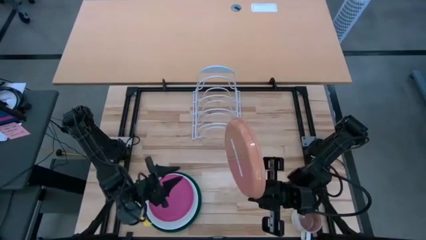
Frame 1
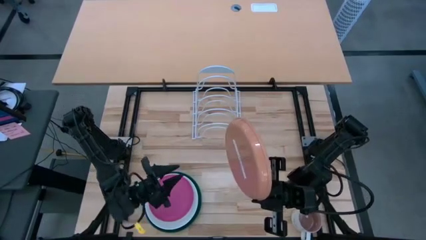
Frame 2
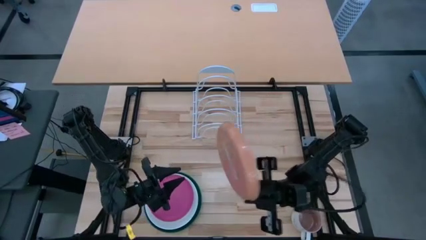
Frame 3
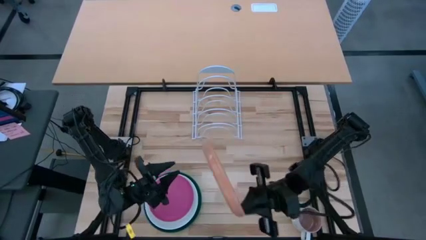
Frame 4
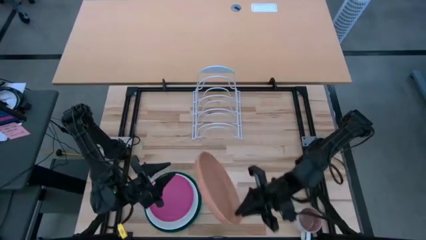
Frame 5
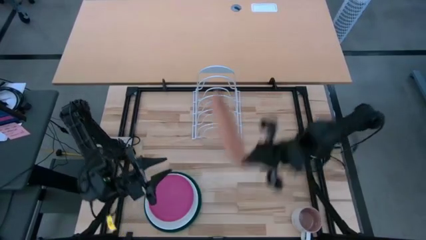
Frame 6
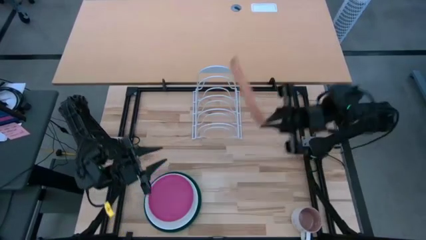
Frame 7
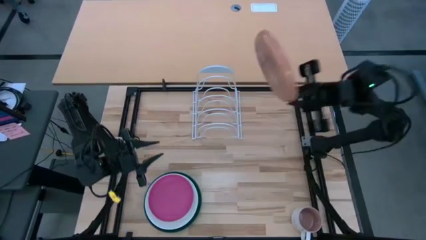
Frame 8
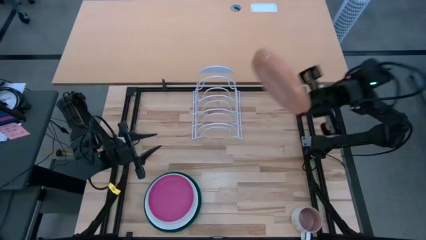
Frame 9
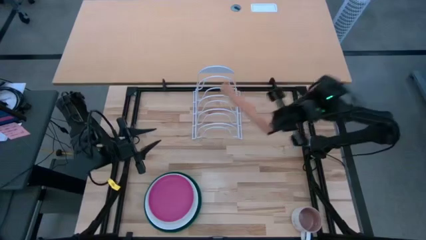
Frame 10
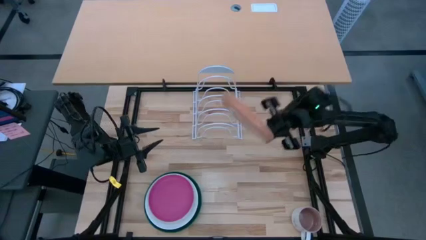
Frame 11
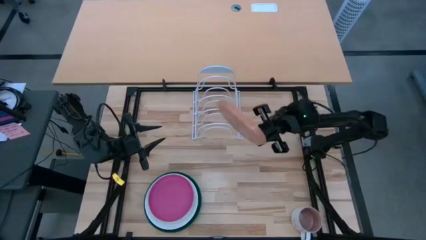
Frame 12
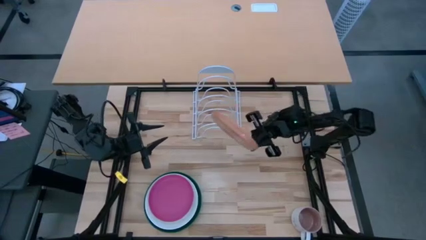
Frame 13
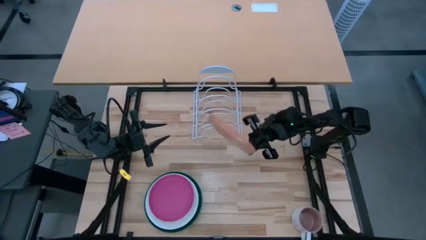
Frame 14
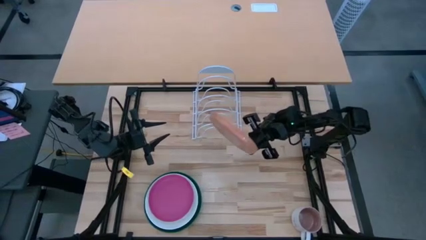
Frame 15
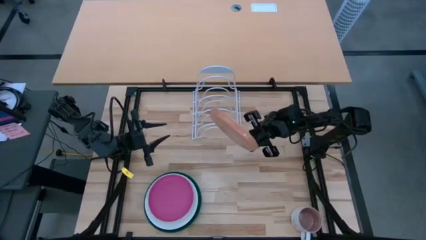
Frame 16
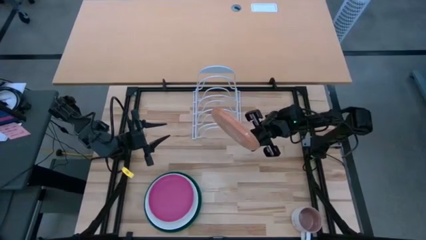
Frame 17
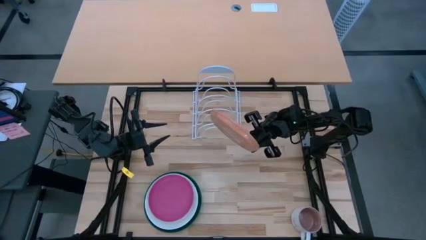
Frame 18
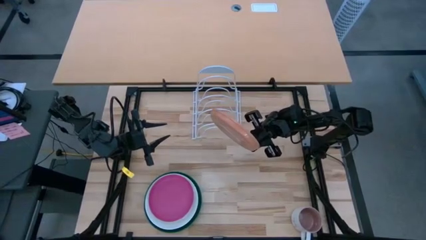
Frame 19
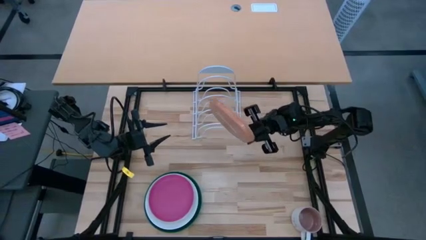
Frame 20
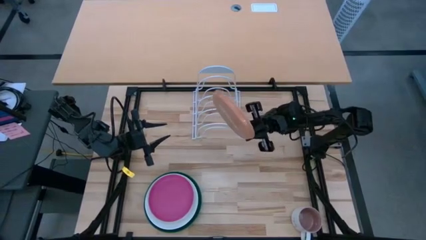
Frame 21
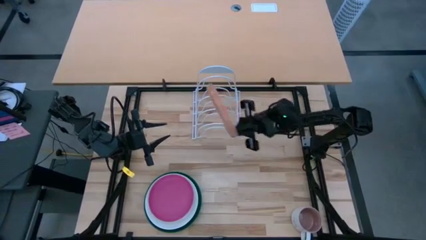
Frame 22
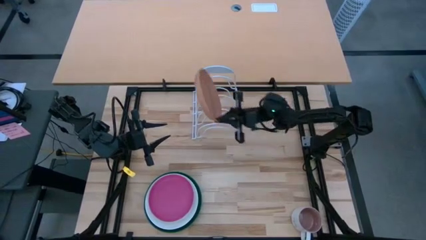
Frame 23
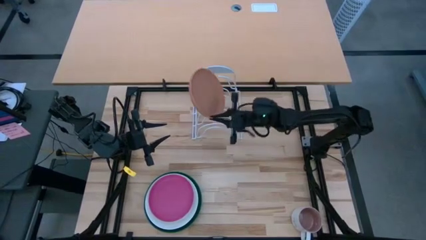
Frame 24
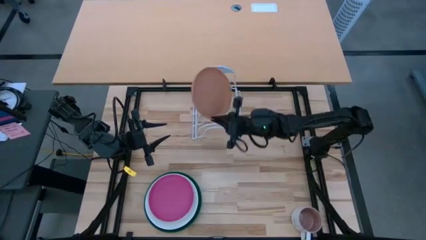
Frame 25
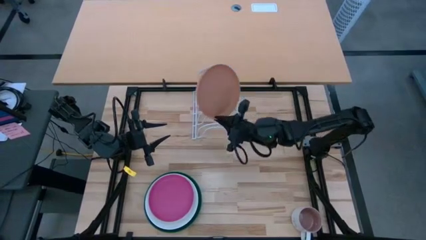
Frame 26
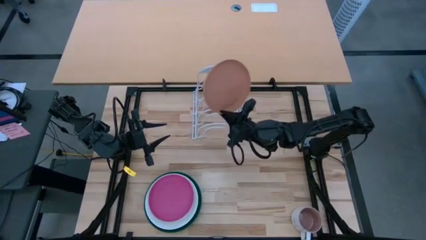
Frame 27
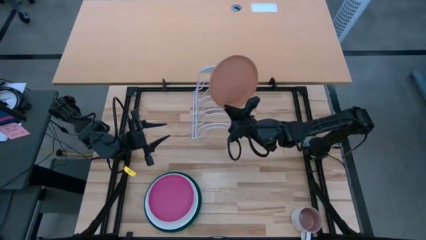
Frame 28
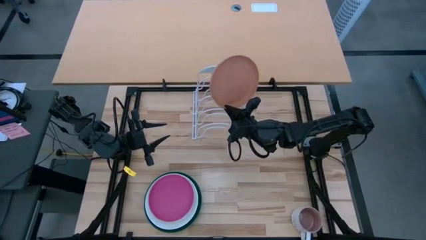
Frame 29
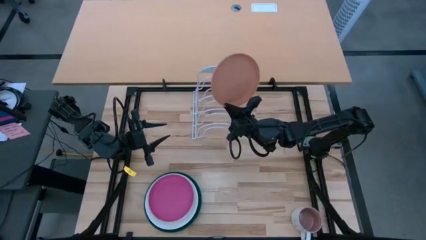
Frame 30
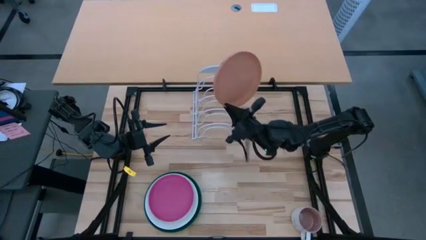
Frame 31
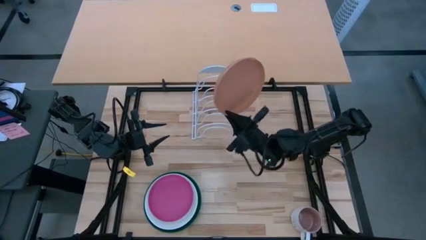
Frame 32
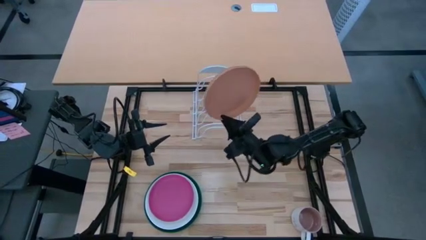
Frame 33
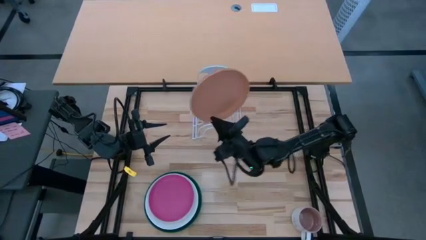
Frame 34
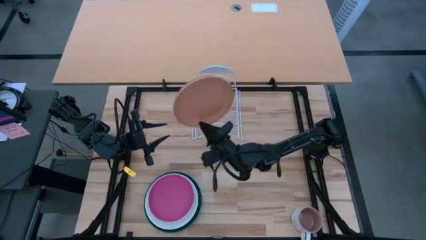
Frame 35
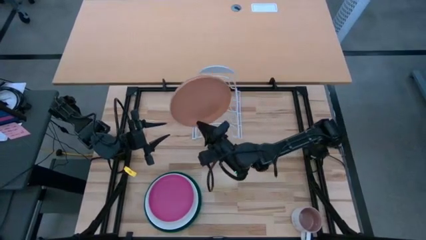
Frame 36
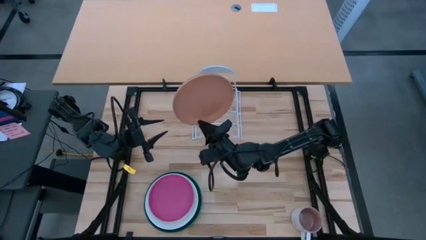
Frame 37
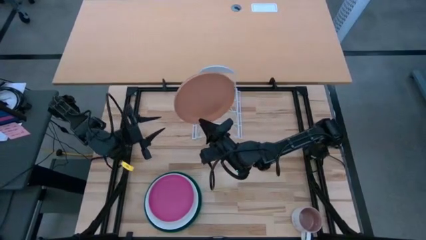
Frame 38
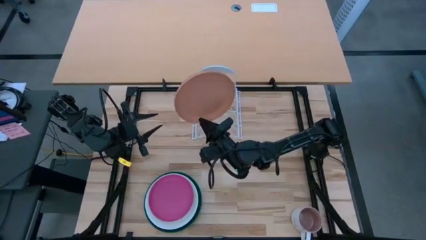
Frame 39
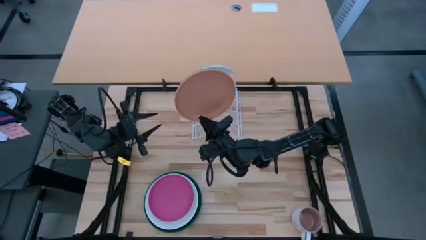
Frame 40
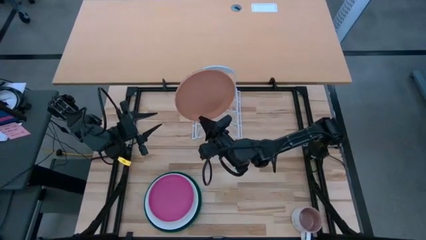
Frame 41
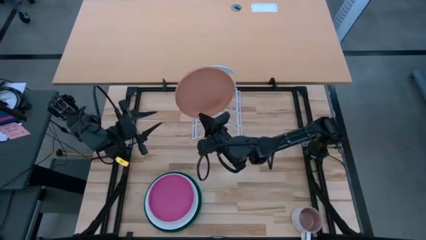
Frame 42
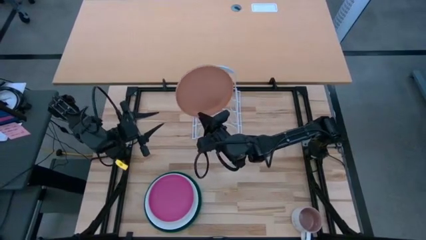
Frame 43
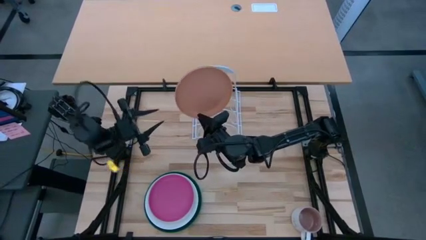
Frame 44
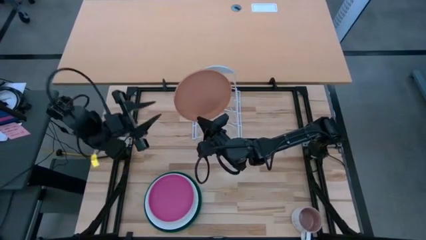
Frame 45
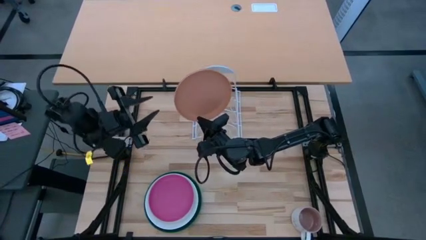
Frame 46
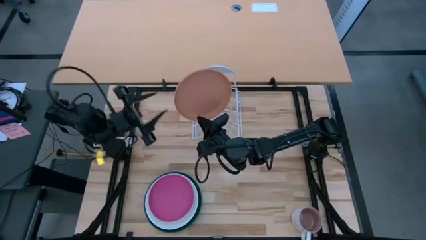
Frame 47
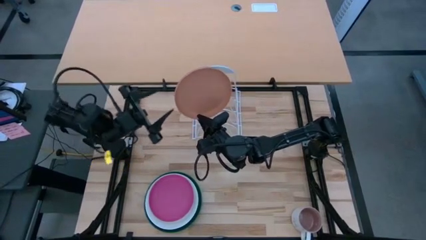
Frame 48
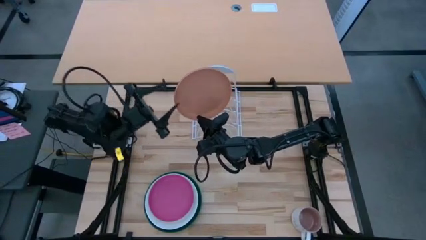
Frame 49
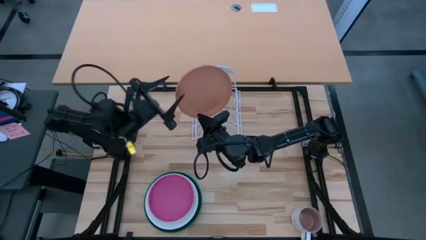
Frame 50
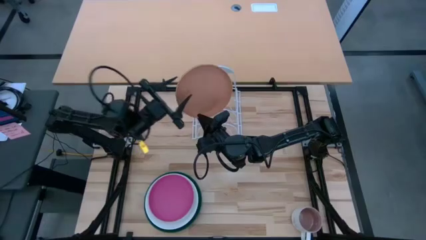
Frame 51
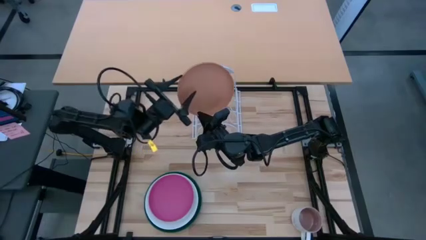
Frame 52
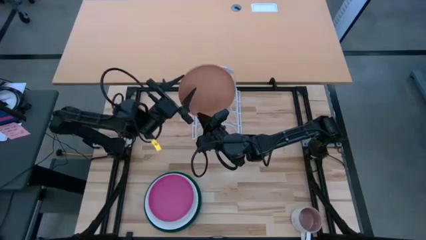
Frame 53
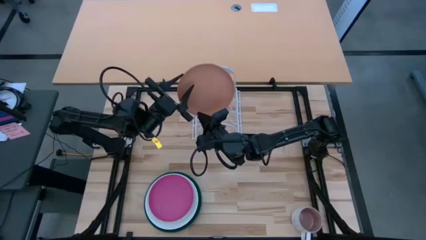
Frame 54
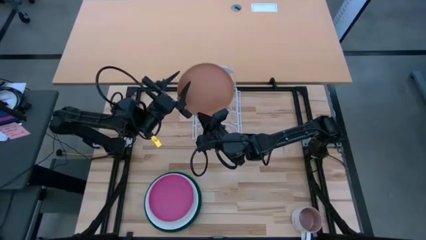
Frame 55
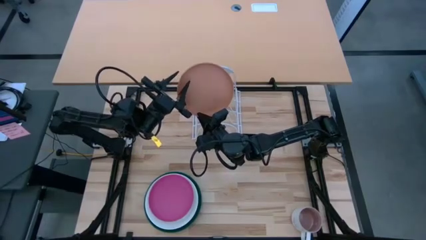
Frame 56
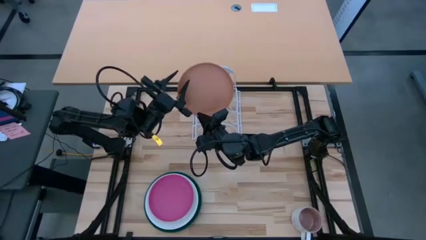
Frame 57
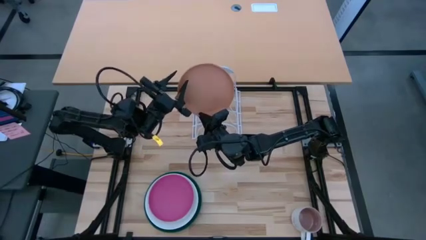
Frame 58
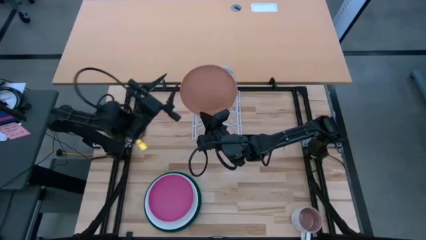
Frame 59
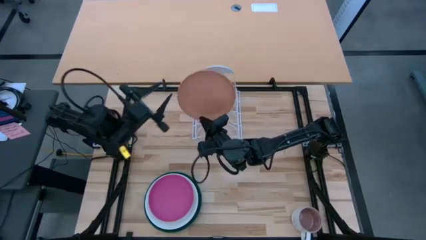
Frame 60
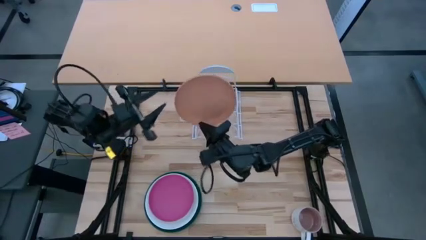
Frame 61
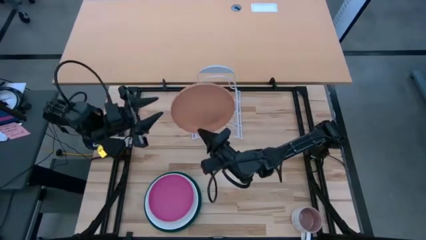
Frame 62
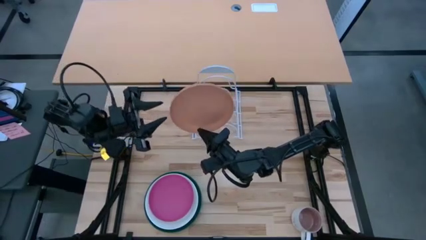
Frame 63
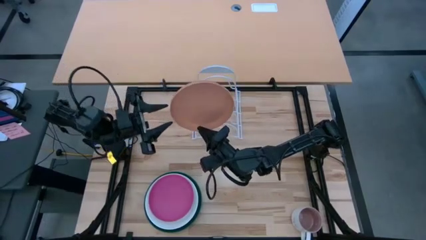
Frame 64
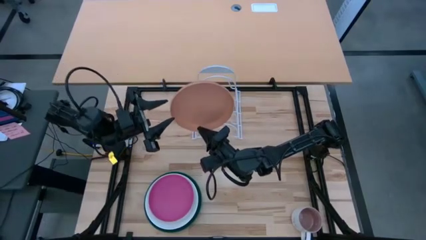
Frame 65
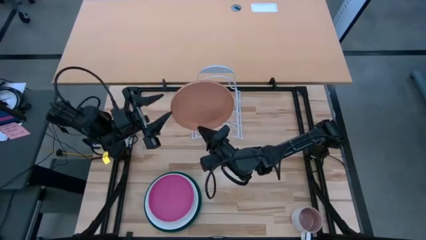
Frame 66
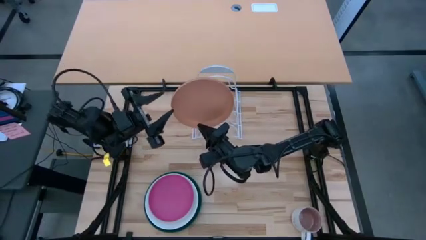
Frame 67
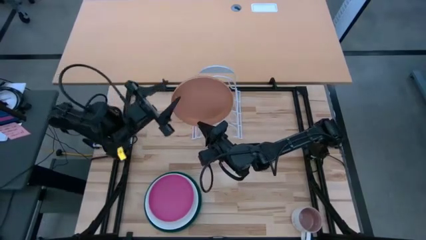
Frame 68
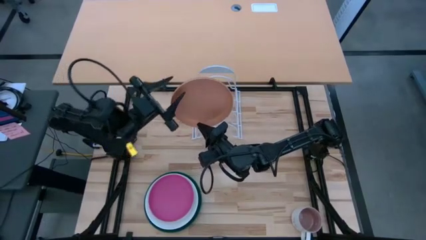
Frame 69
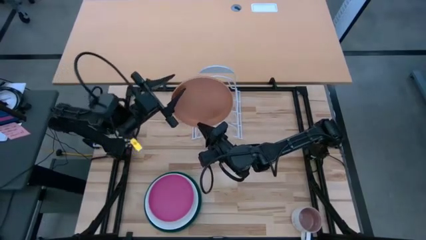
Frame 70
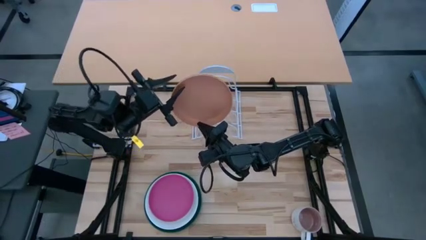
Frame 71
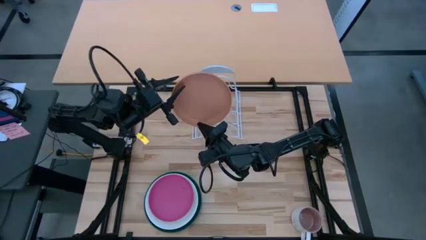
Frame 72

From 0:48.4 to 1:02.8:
Task: Sort dishes
Put the orange plate on the dish rack
